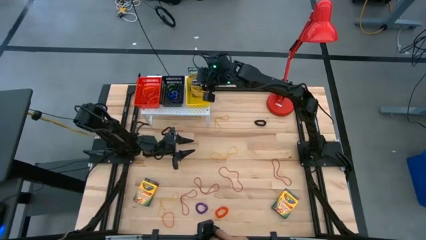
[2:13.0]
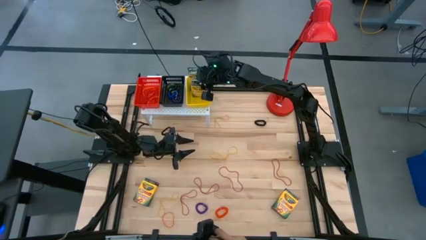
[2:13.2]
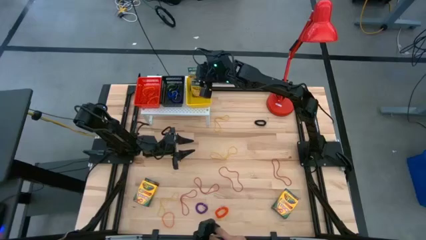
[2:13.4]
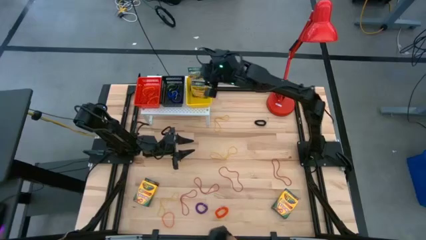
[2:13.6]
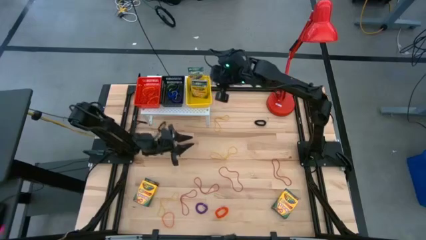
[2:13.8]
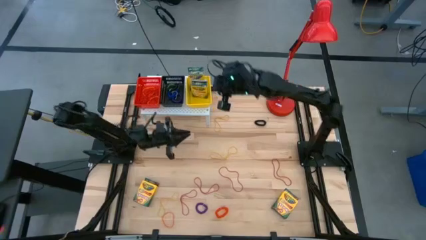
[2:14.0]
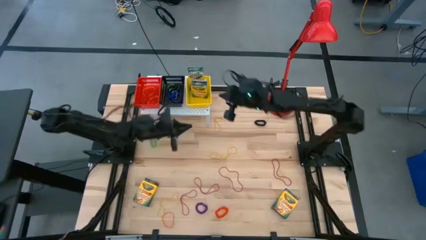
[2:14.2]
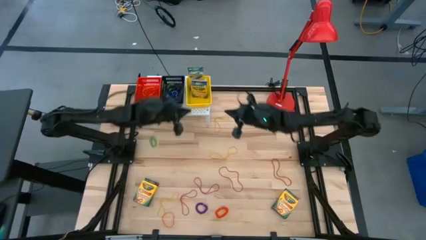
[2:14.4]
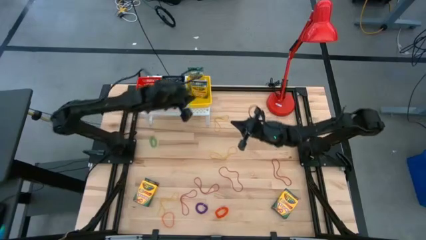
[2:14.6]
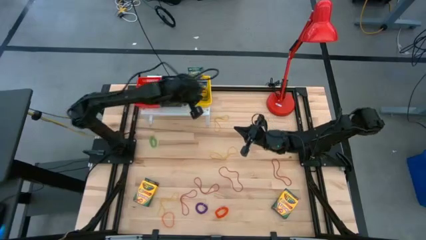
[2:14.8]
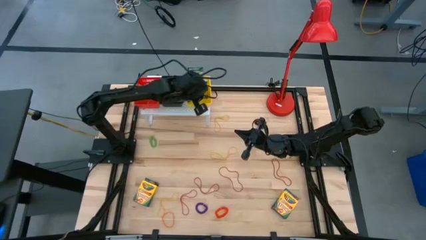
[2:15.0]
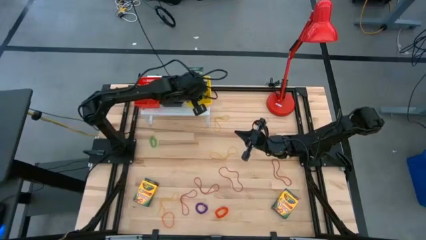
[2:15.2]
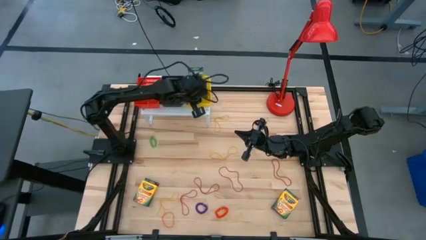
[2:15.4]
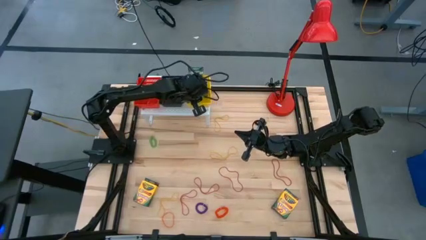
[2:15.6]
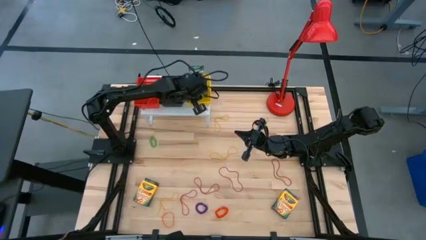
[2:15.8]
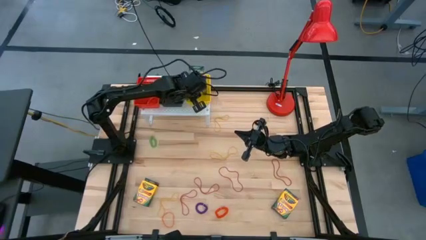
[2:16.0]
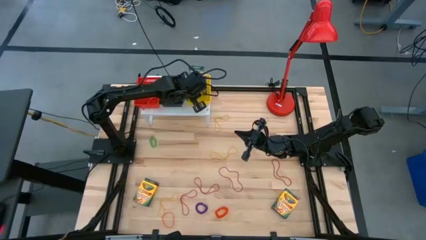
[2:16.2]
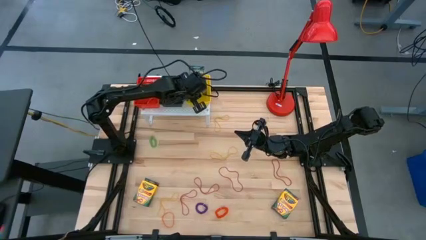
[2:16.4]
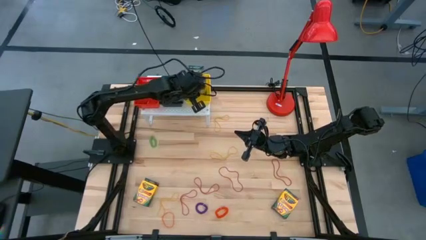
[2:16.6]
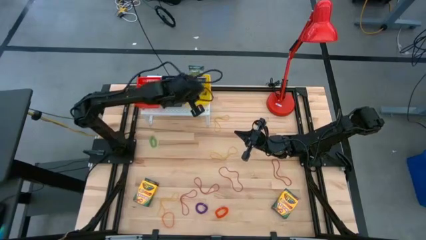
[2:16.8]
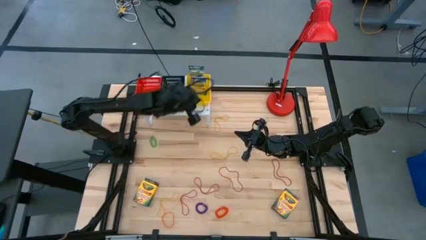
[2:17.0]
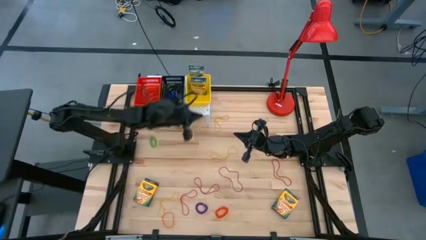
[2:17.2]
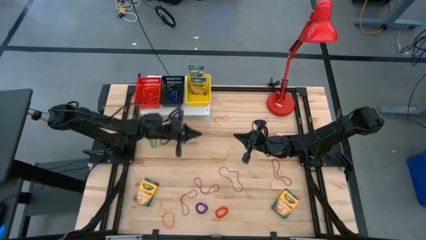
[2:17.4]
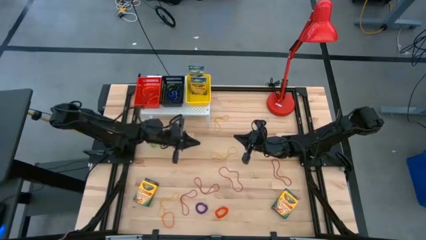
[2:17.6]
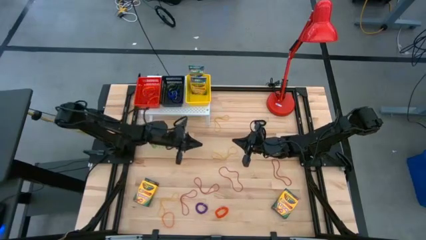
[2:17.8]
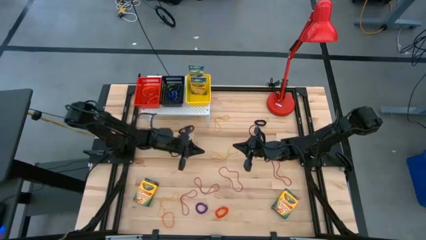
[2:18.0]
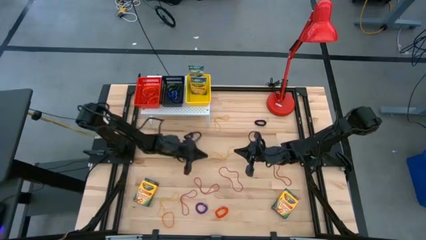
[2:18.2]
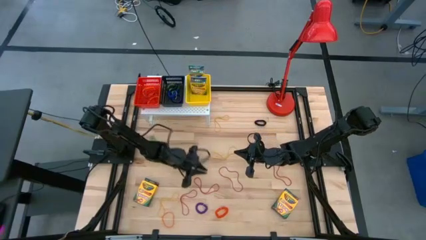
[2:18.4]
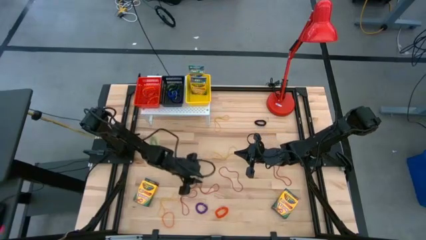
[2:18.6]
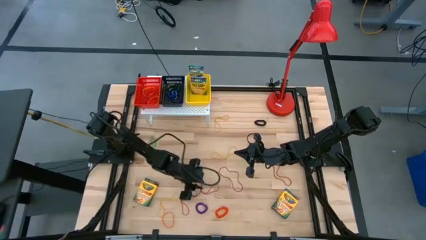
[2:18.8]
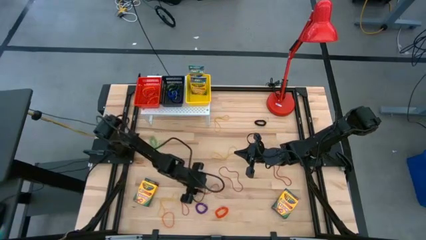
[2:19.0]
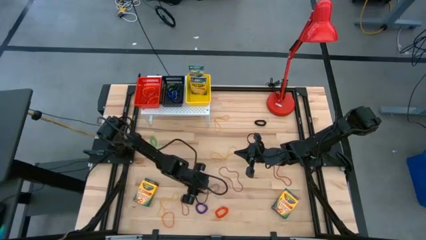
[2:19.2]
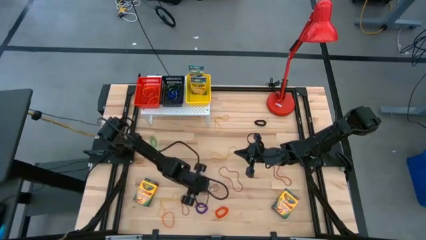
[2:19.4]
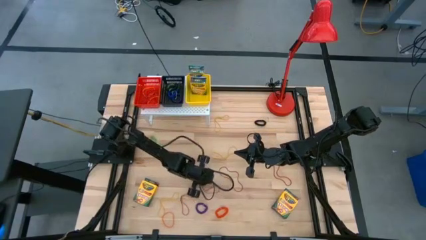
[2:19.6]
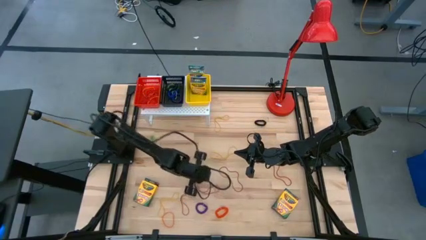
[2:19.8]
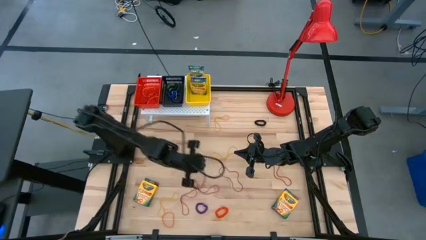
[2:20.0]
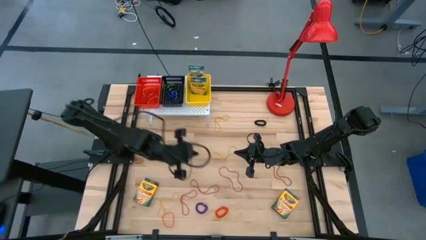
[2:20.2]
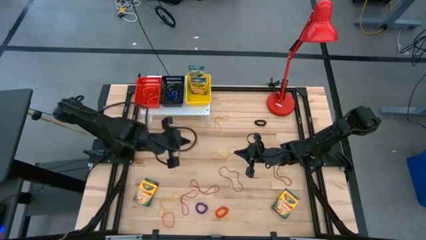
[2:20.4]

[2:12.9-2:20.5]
Task: Pick & Place Office Desk Supplies
Put the red rubber band into the red bin on the shelf

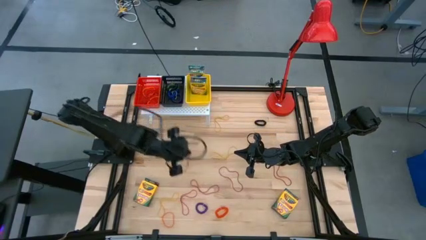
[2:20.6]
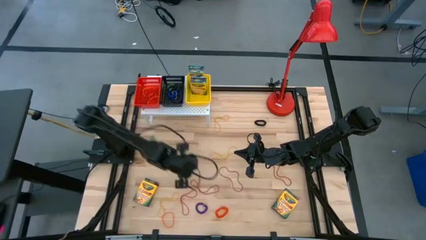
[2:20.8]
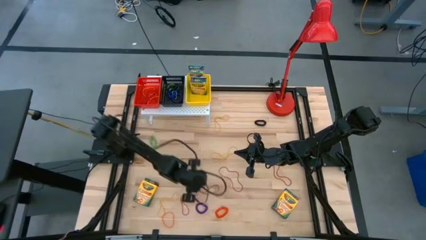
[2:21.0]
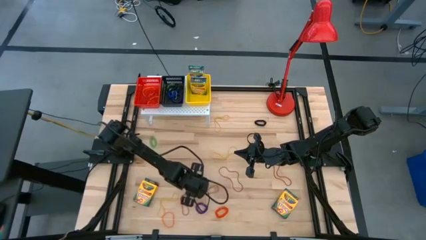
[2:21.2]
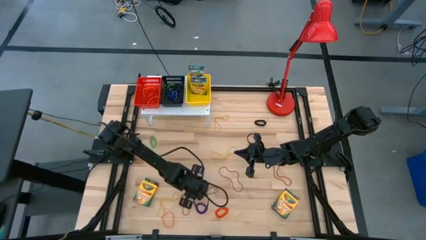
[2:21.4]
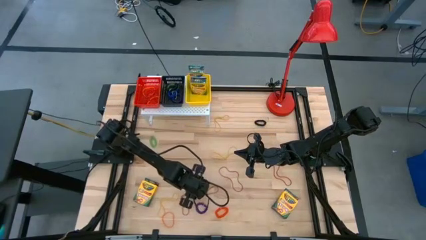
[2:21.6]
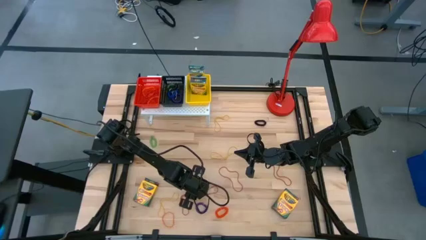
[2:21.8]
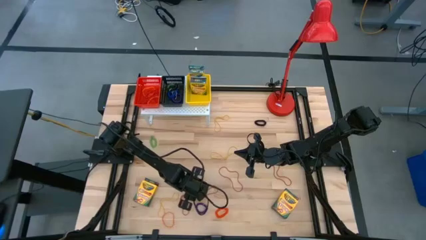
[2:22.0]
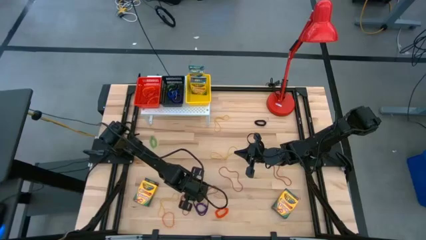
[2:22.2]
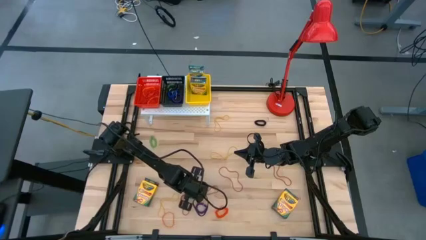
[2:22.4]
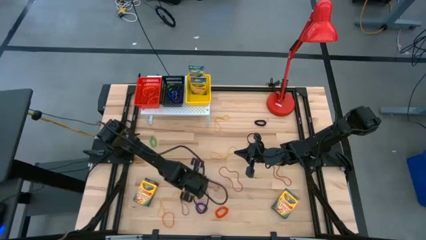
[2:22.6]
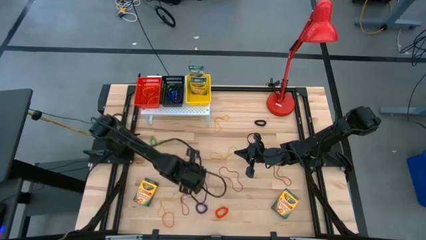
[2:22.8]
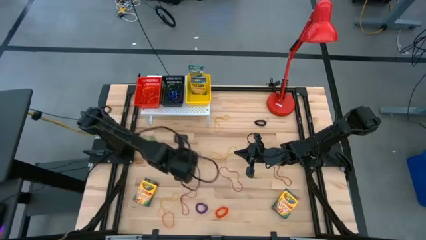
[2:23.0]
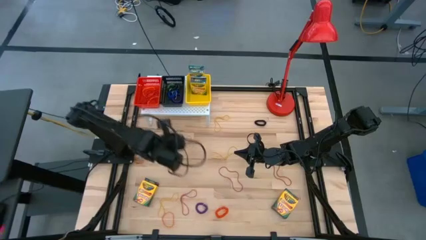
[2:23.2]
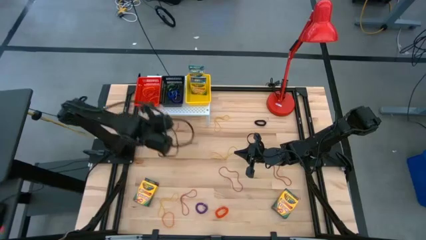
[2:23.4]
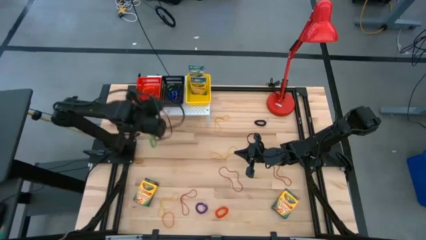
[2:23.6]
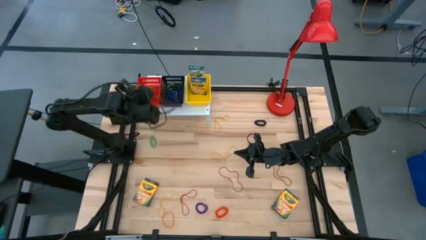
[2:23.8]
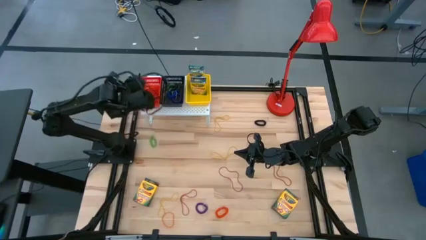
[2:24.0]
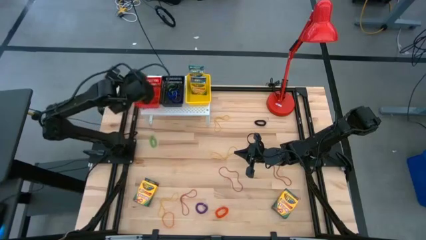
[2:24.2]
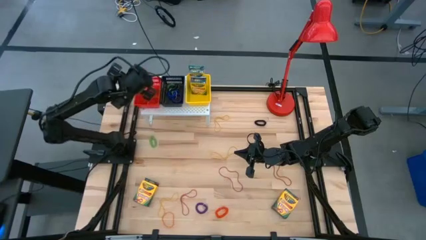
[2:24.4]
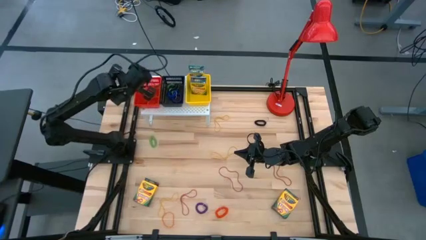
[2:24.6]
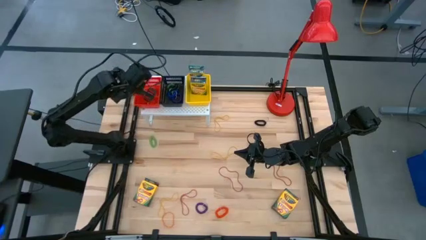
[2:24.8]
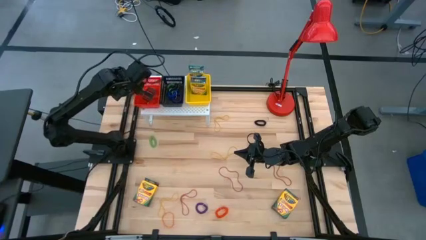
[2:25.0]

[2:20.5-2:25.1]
Put the red rubber band into the red bin on the shelf

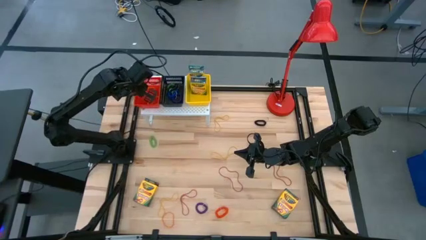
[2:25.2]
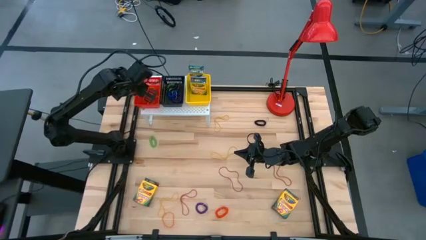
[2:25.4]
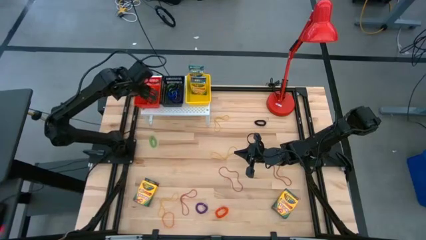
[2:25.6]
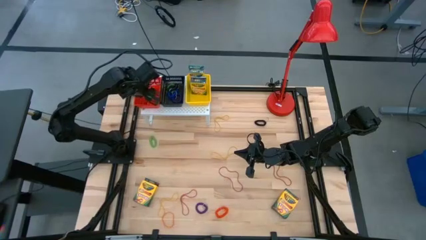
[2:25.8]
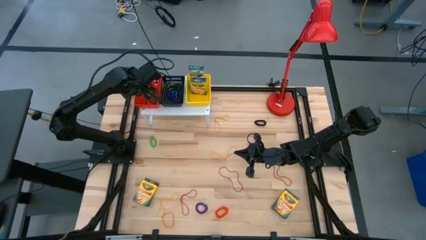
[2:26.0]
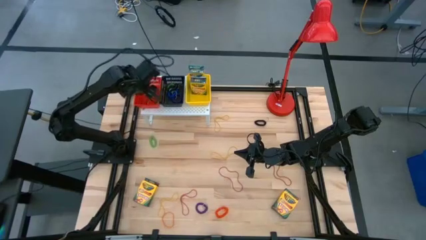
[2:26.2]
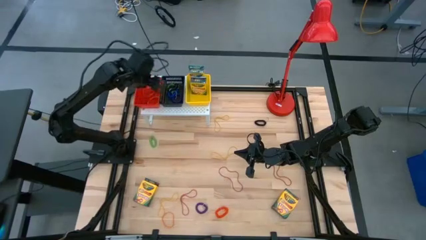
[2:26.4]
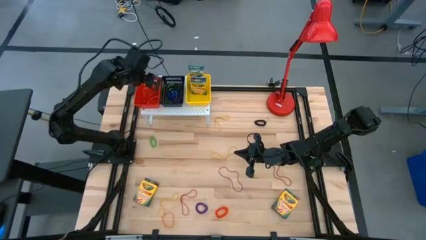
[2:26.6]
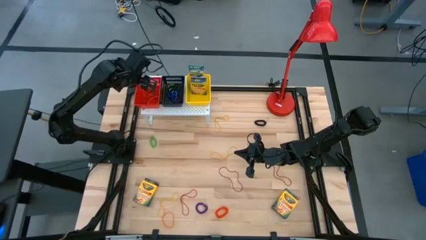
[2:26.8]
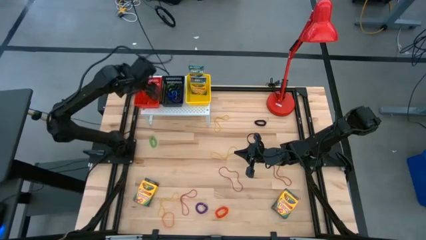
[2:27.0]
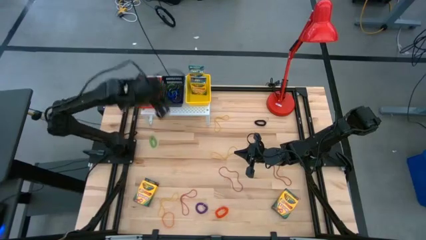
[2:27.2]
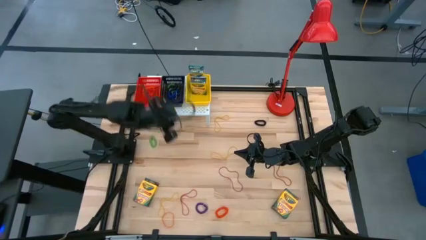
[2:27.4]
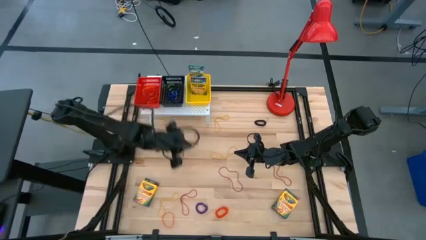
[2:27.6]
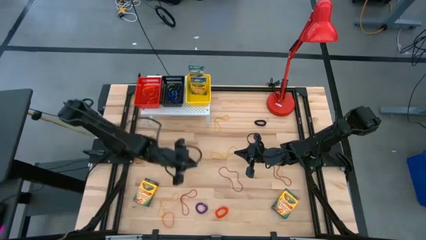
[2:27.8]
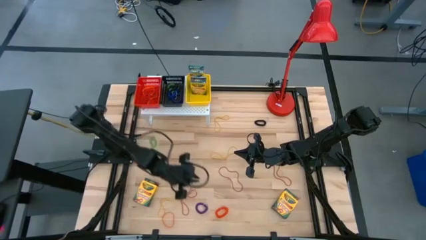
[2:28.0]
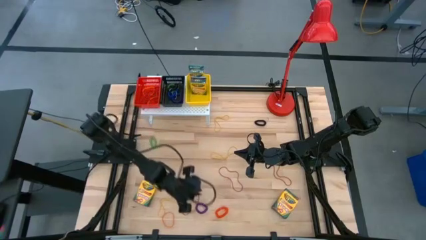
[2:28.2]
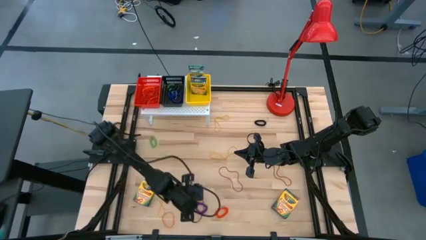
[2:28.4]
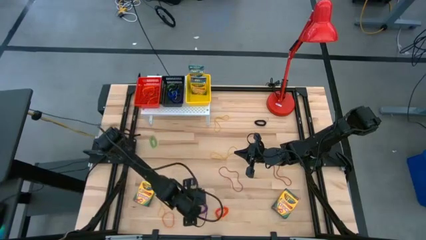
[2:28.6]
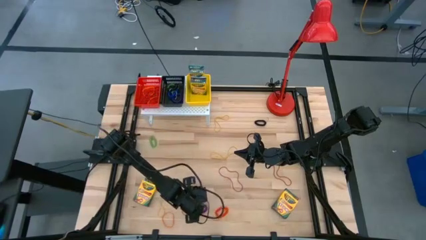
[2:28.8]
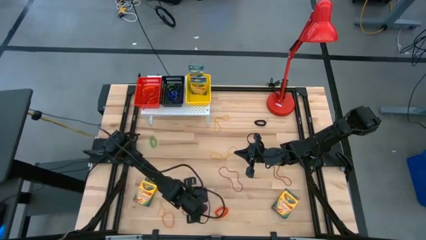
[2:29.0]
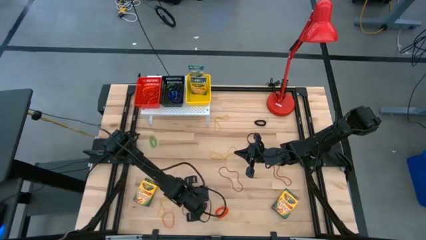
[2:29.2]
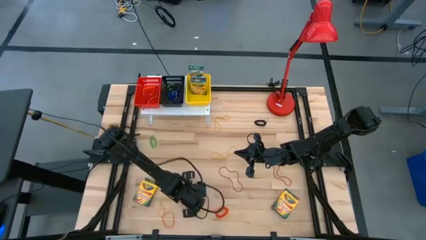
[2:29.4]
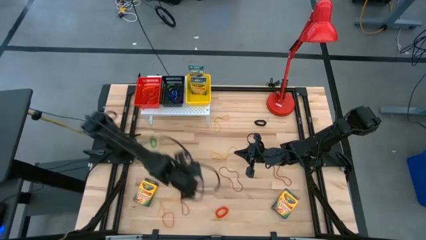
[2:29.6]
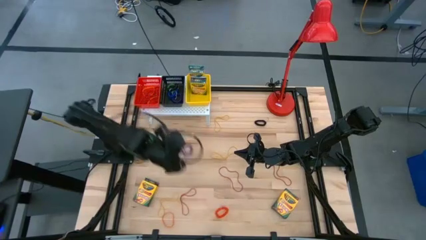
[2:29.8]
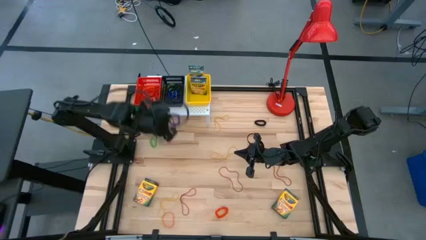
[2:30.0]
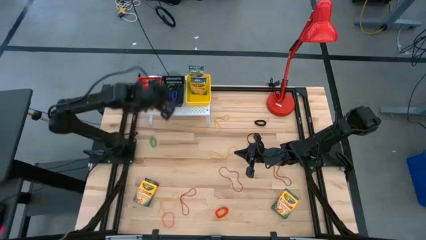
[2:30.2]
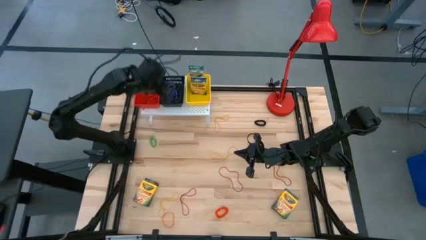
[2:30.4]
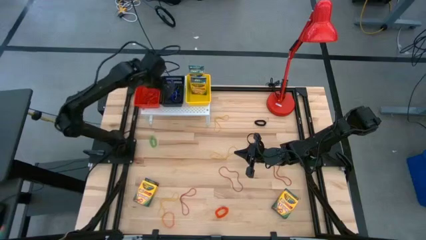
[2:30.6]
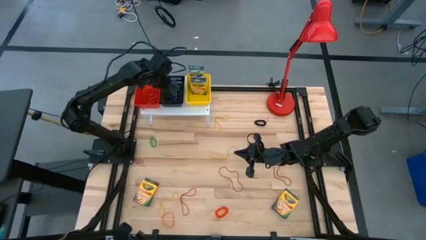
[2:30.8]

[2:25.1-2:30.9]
Put the purple spring keychain into the black bin on the shelf
